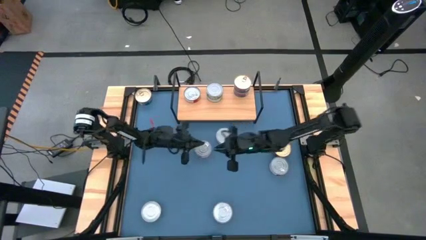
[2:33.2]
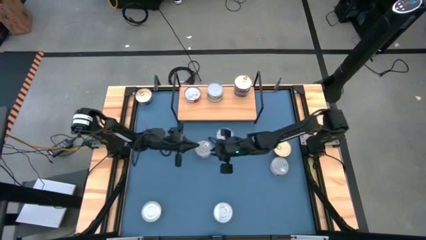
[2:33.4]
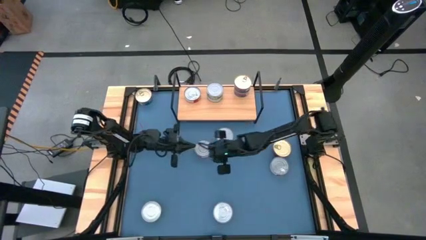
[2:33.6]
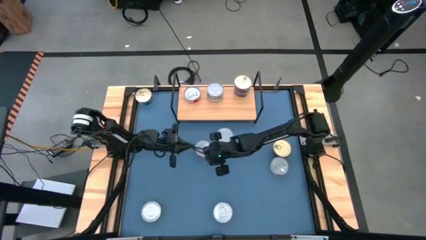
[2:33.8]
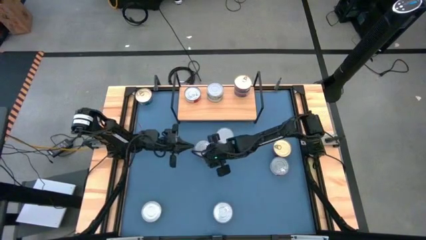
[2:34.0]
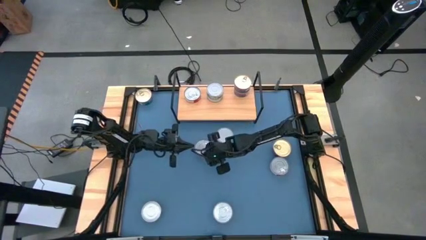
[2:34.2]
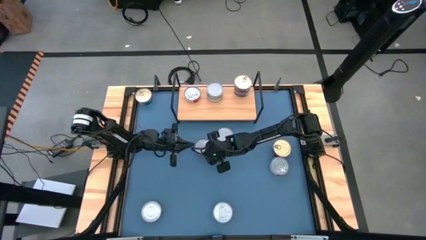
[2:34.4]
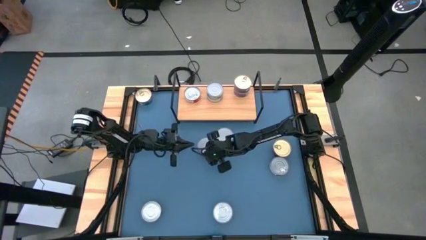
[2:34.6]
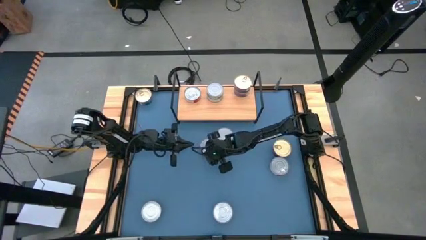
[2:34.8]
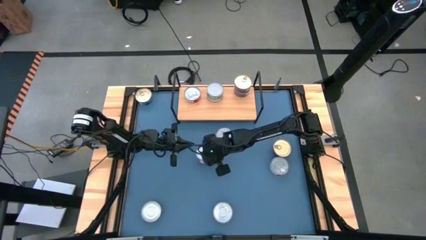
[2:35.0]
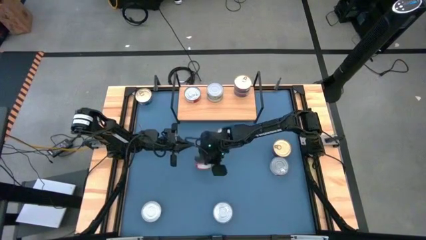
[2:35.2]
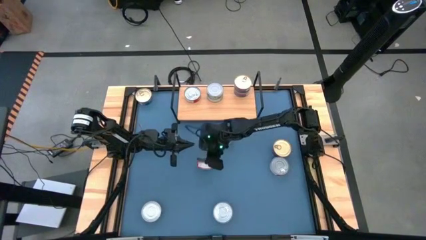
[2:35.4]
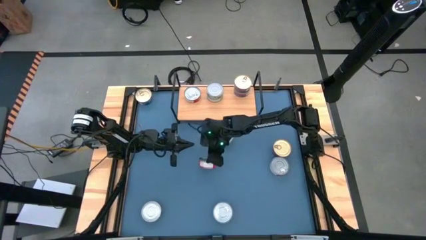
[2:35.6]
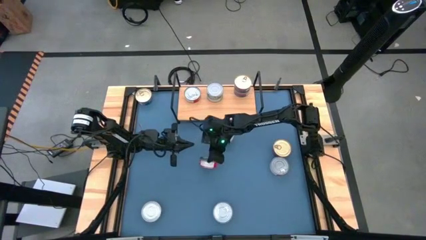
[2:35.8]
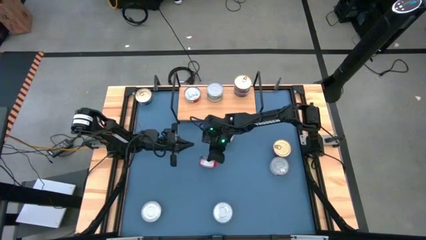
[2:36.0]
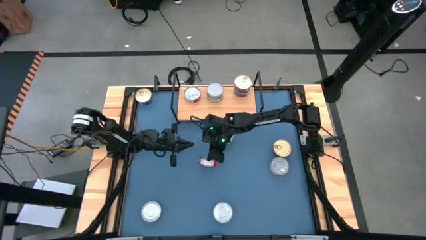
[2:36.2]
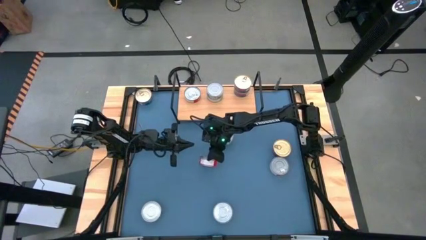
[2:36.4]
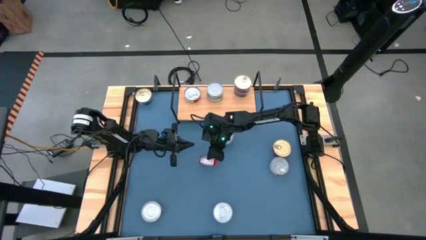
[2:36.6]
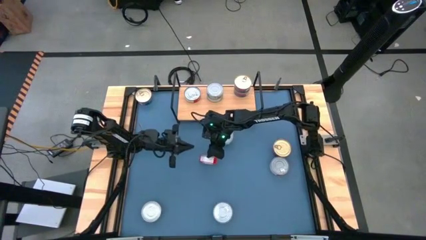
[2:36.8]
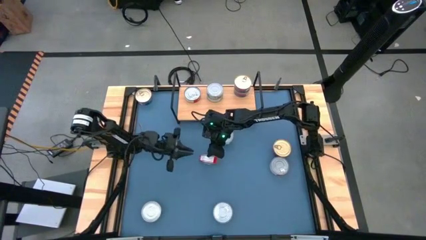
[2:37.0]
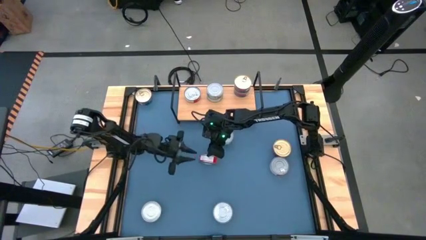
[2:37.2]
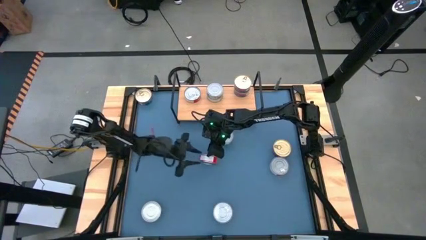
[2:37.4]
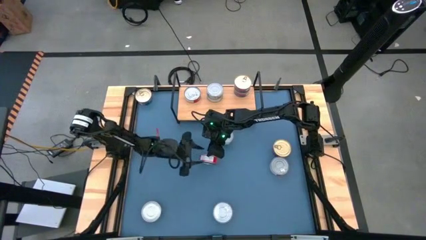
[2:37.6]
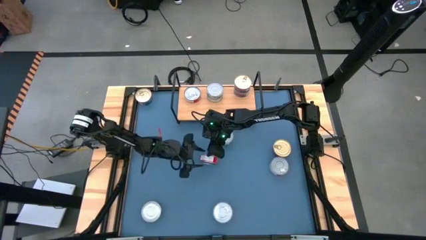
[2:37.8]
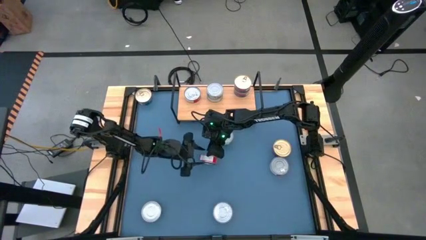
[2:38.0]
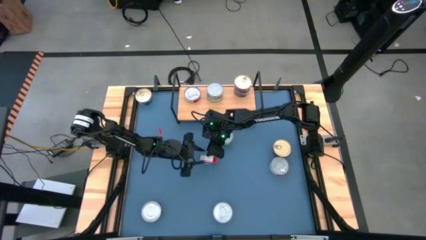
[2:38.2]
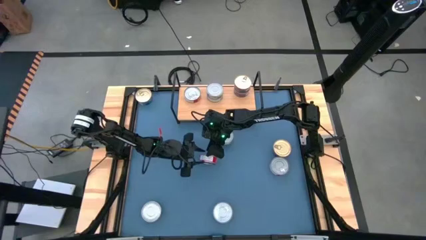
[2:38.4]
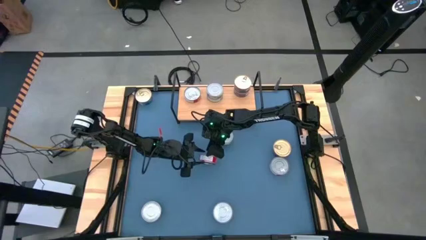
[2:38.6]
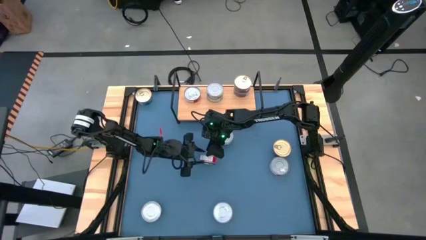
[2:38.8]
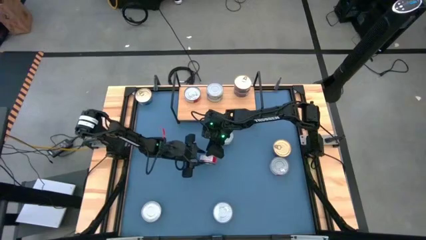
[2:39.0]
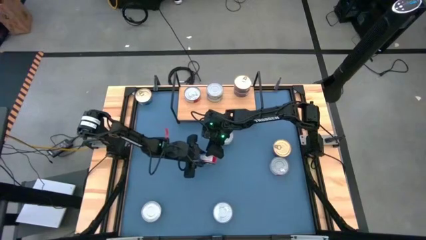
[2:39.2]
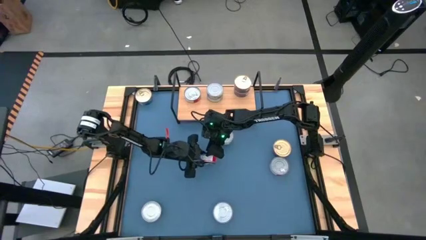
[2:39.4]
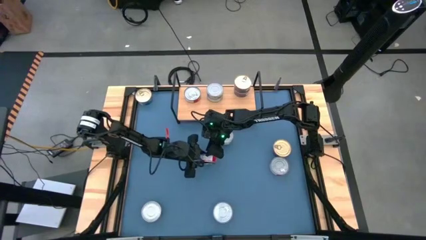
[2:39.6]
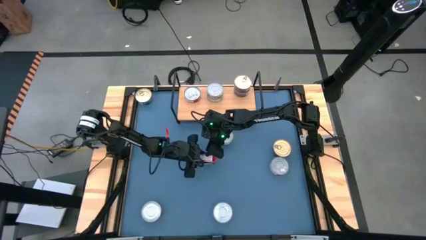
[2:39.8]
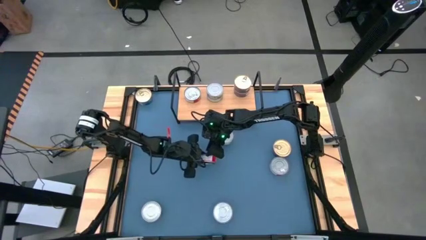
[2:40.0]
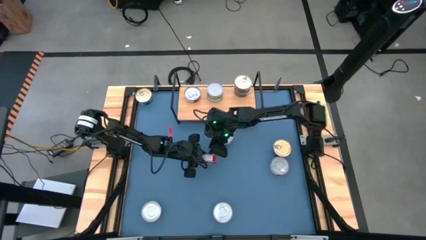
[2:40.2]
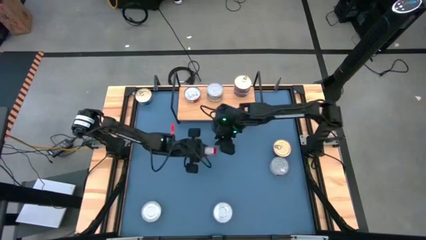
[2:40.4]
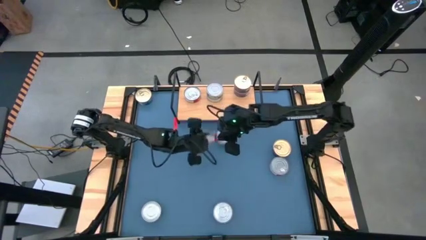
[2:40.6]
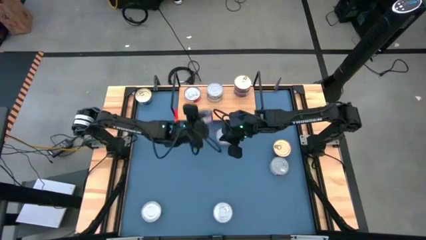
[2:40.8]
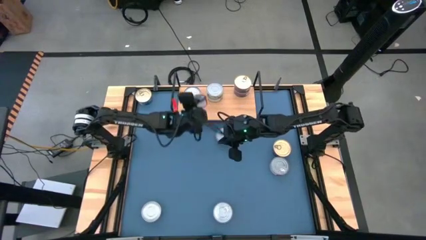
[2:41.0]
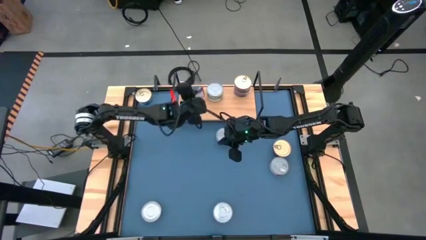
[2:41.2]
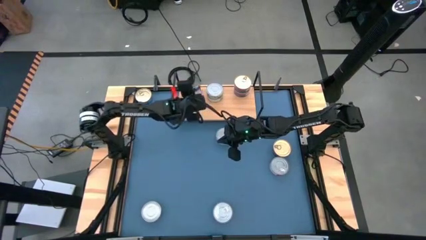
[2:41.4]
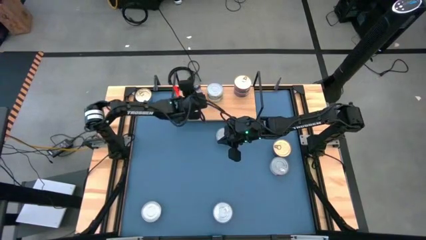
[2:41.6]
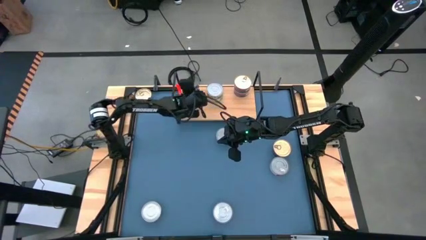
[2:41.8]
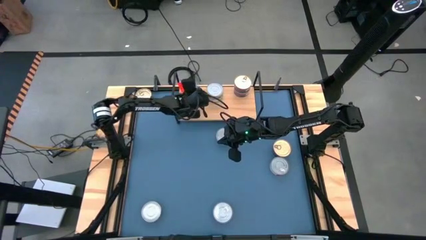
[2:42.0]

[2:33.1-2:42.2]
Task: Stack canned seafood by type on shelf
Stack the red tuna can on top of the red tuna can on the shelf

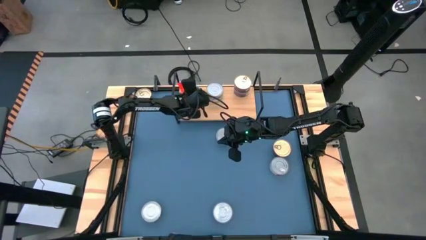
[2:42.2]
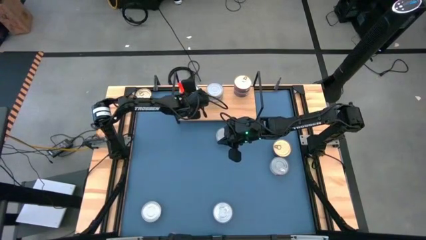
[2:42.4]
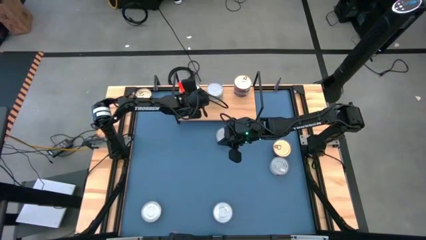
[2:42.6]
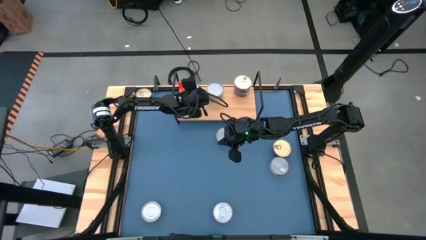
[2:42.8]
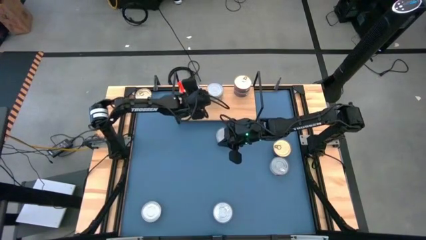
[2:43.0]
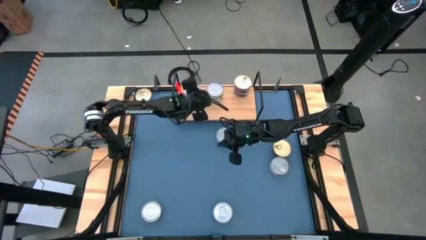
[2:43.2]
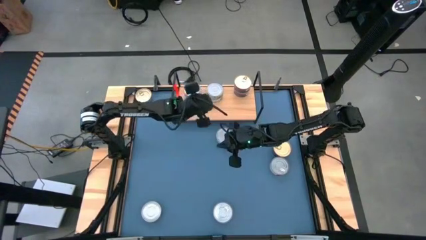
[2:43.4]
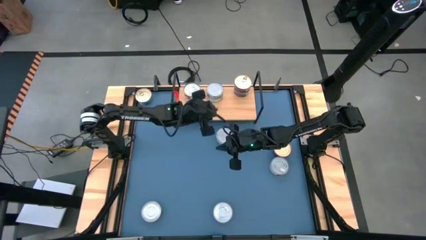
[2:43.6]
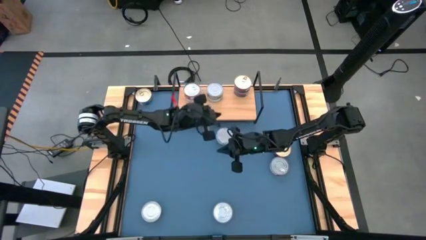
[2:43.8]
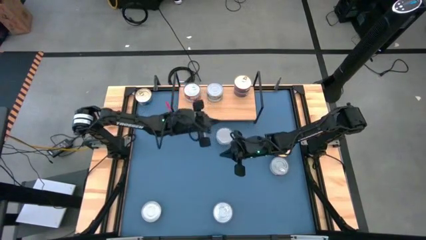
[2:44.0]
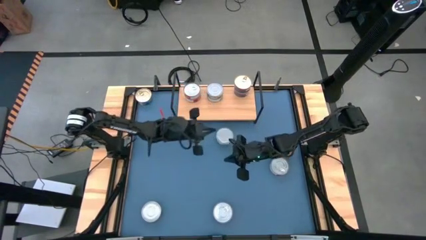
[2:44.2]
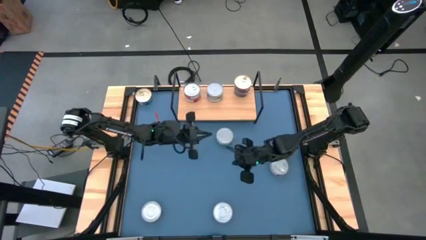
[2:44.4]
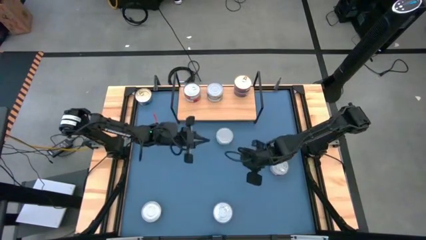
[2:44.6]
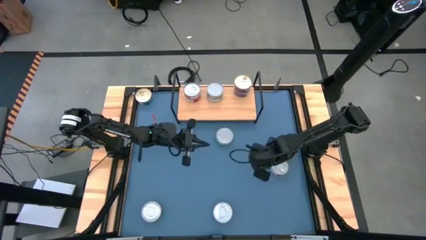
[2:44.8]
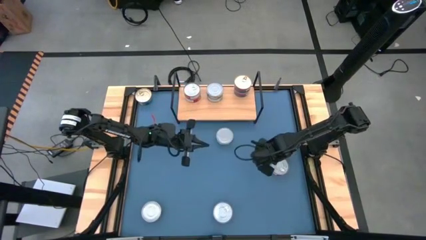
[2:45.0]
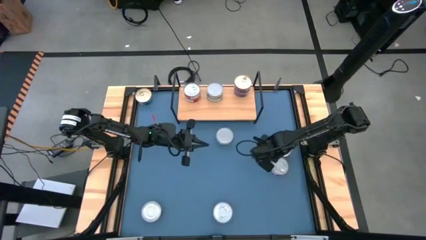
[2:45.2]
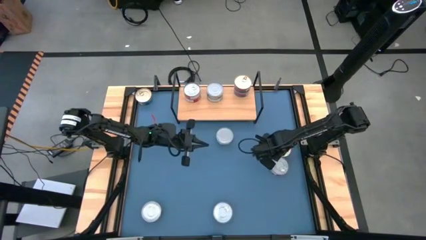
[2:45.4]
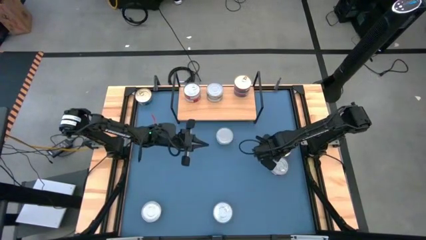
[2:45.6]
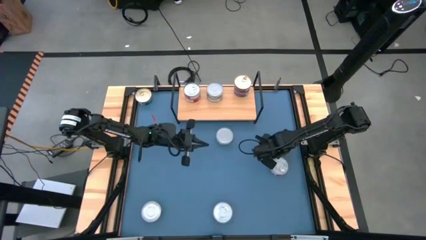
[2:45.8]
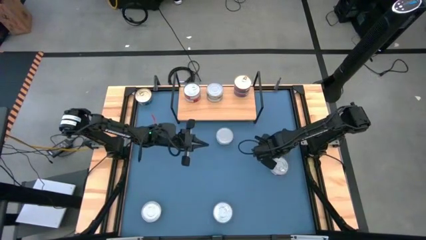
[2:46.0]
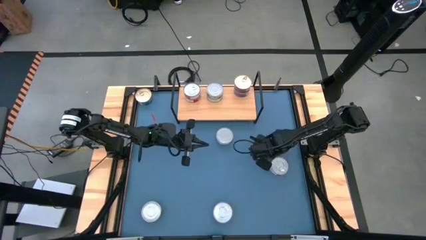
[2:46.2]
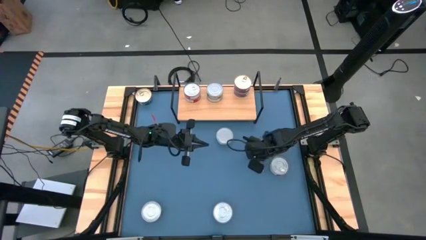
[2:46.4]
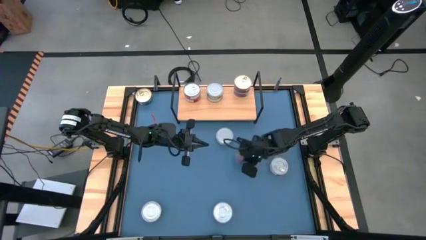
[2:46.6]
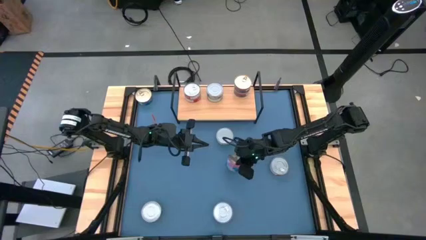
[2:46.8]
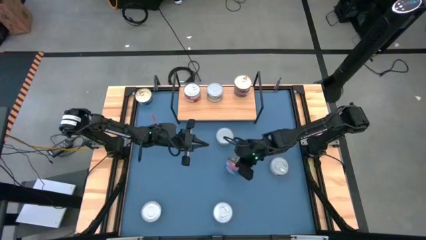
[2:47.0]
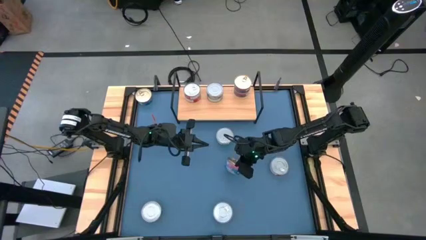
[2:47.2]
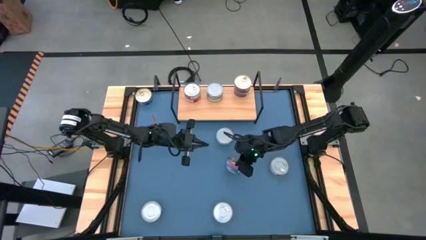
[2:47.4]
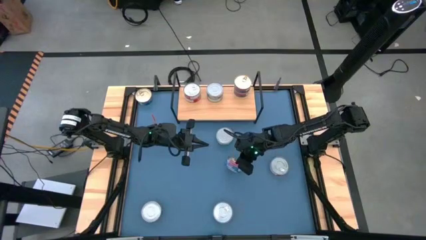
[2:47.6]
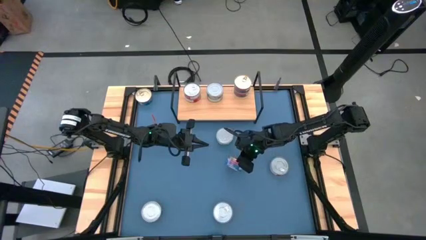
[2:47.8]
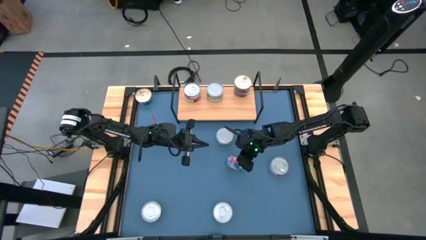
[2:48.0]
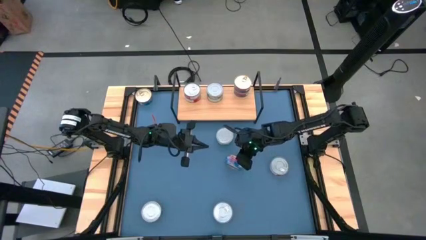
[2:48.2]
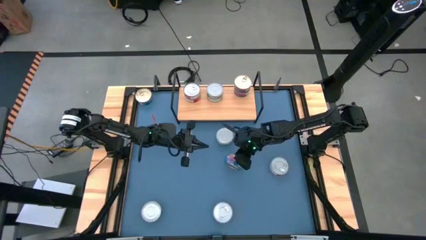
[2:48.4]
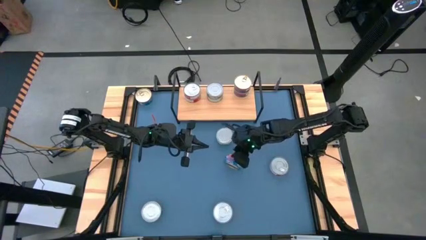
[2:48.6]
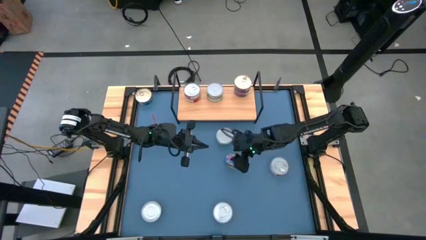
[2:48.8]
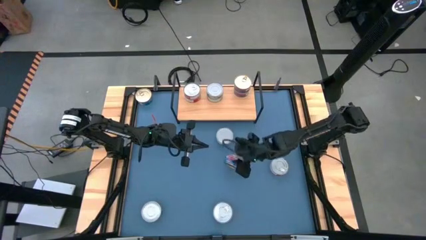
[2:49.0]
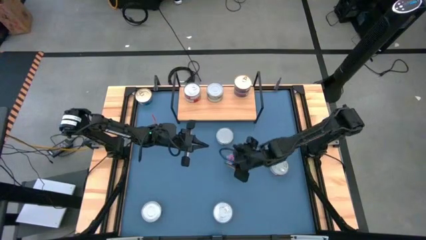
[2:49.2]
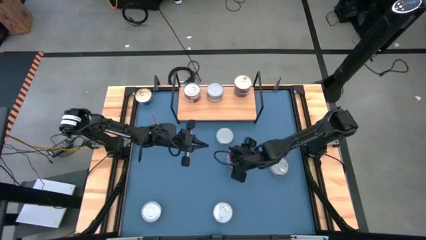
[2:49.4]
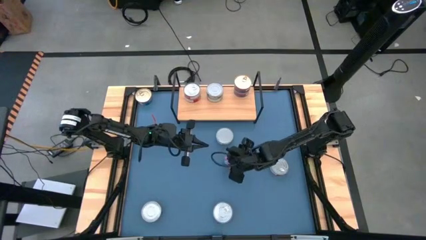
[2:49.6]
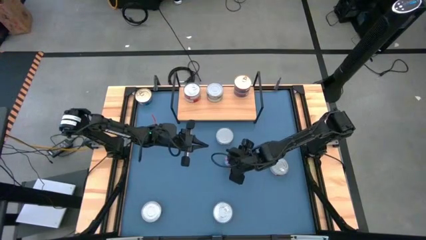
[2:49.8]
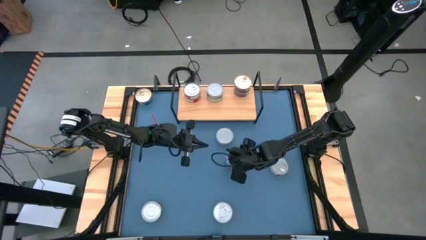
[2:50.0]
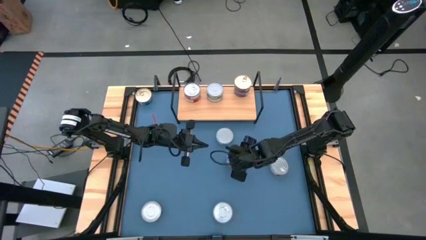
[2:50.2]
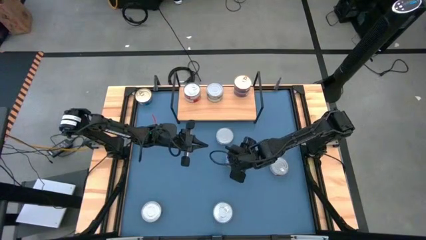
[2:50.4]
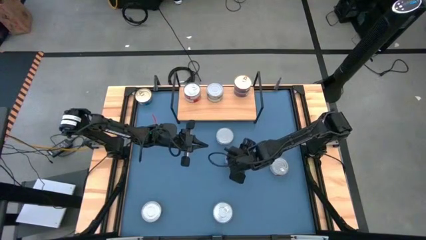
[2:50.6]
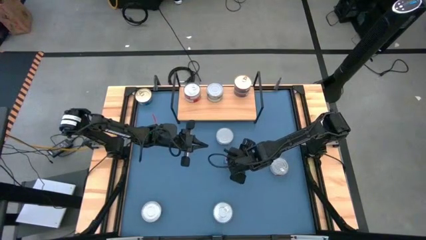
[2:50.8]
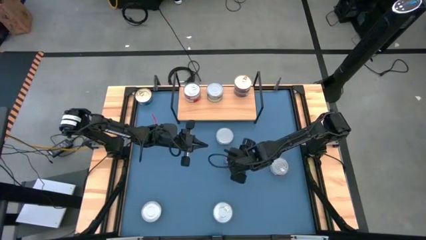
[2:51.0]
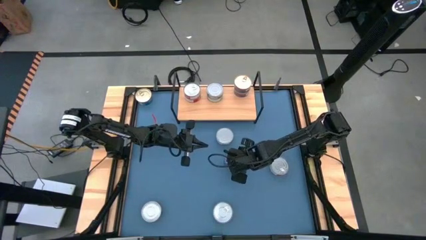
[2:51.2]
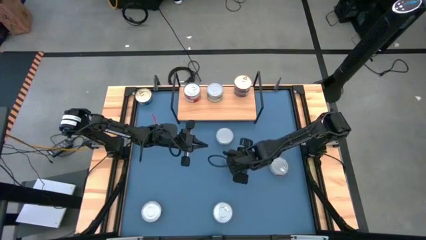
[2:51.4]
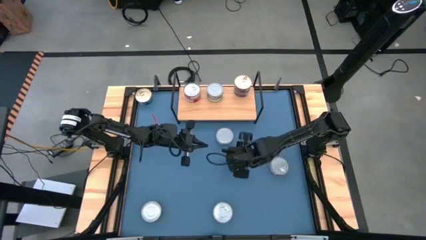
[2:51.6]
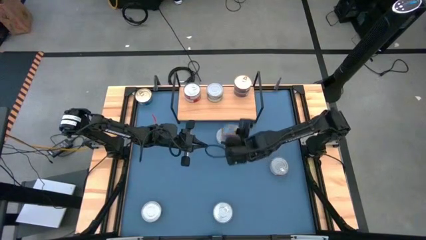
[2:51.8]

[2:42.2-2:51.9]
Put the blue tuna can on the shelf aligned with the stacked blue tuna cans
